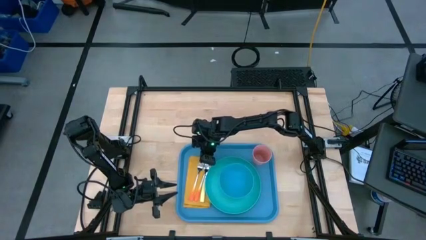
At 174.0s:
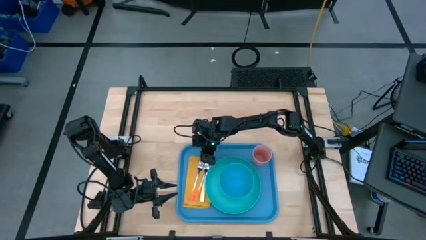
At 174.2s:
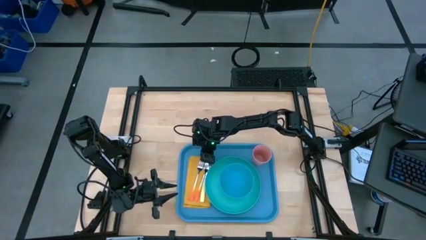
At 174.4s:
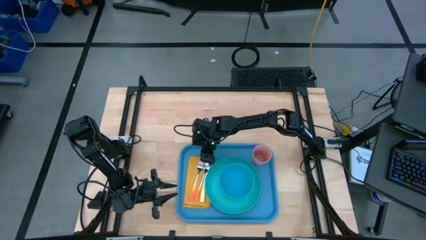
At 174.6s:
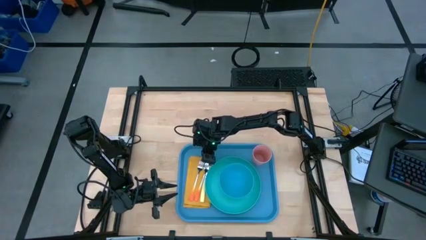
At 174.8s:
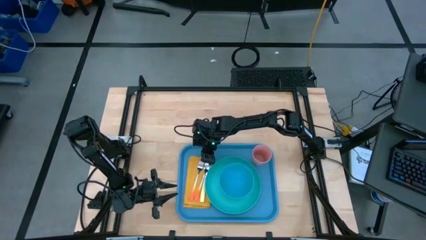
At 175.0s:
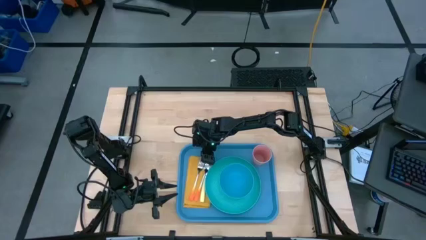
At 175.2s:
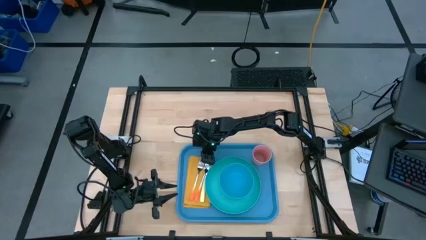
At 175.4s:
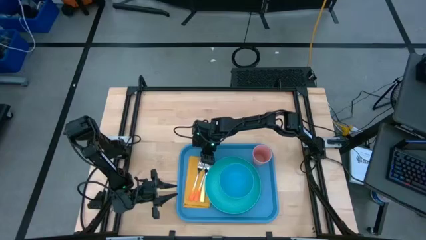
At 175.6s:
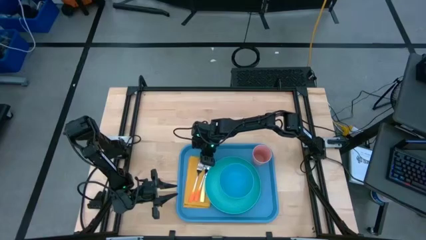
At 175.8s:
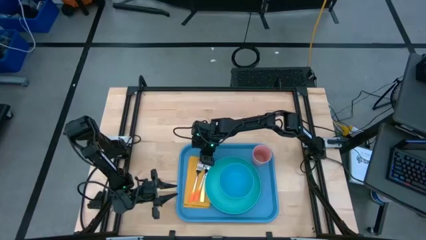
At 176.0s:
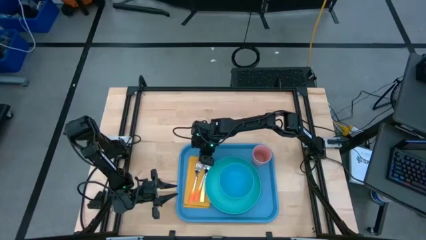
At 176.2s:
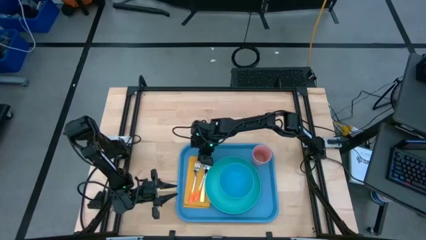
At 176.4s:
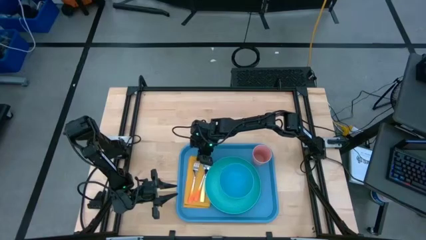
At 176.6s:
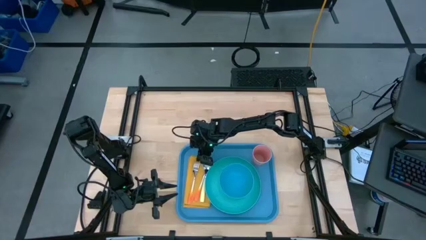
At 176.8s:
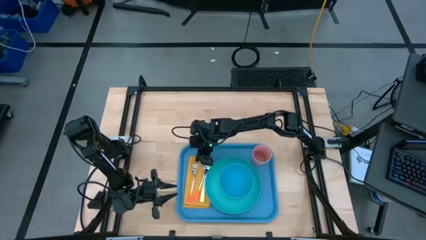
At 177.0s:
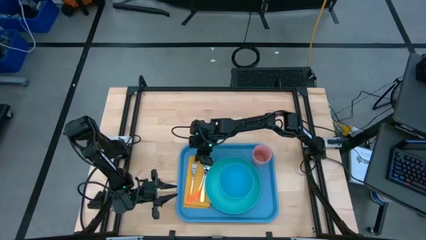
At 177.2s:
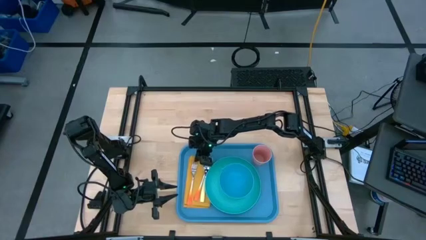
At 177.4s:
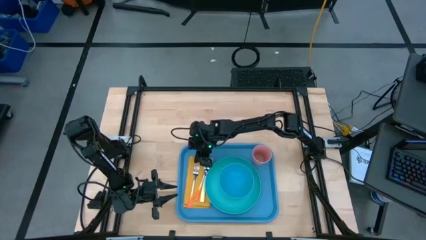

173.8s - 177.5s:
Task: Set up tray
Put the orange fork on top of the yellow napkin to the left of the orange spoon

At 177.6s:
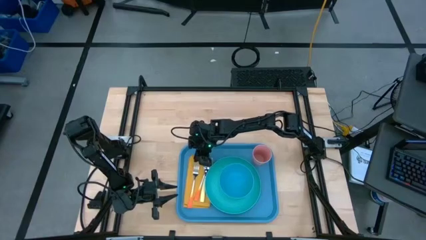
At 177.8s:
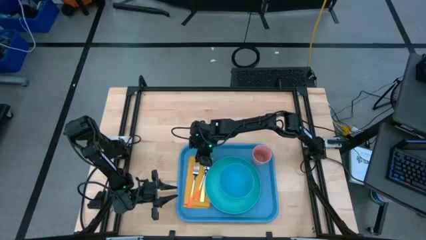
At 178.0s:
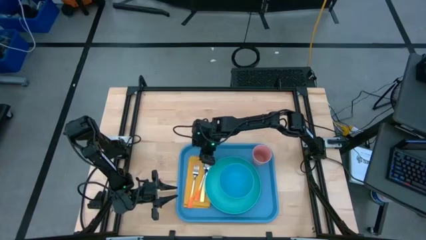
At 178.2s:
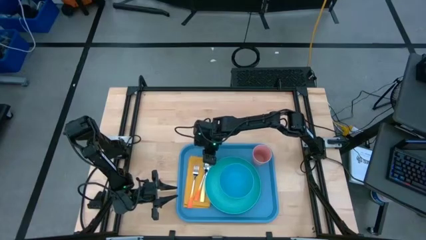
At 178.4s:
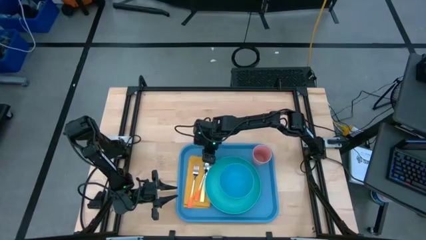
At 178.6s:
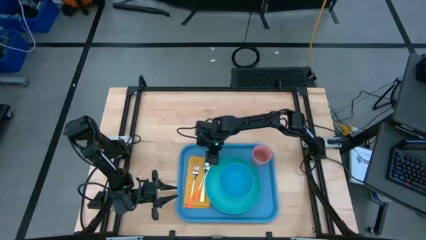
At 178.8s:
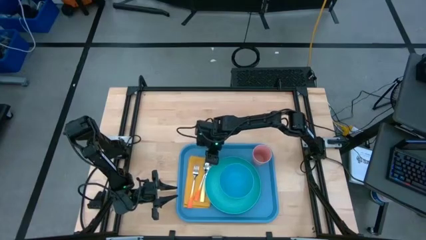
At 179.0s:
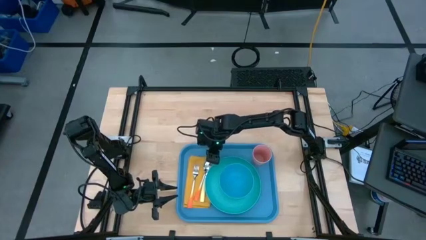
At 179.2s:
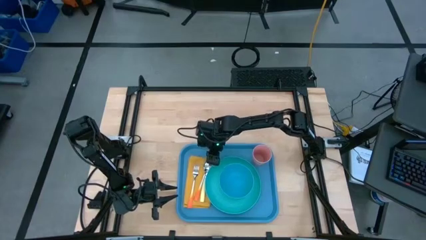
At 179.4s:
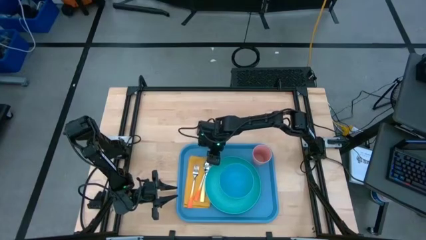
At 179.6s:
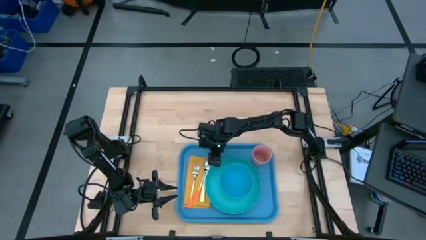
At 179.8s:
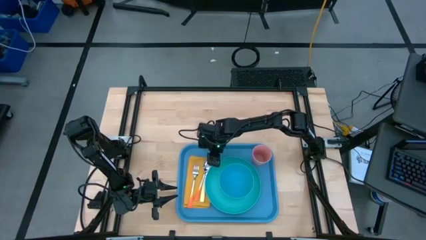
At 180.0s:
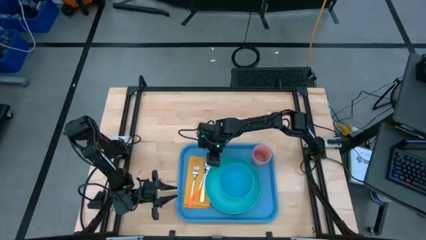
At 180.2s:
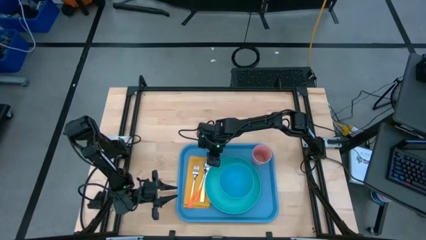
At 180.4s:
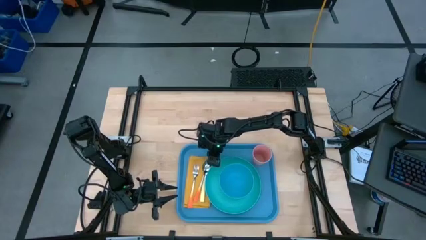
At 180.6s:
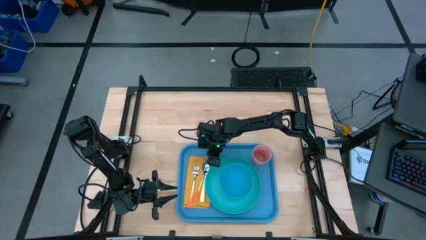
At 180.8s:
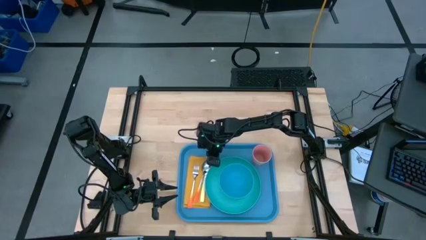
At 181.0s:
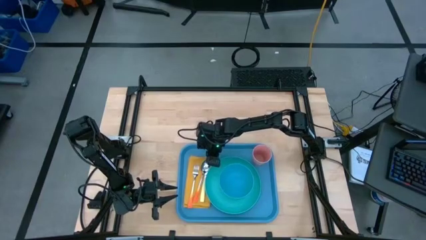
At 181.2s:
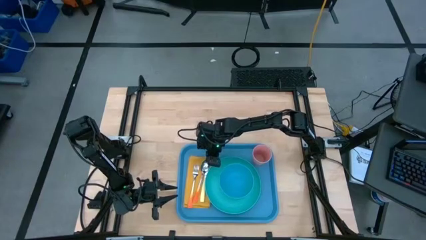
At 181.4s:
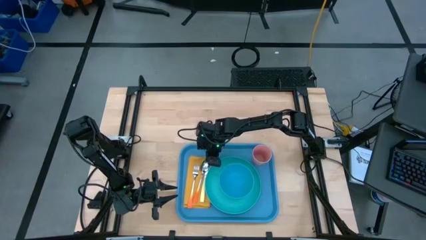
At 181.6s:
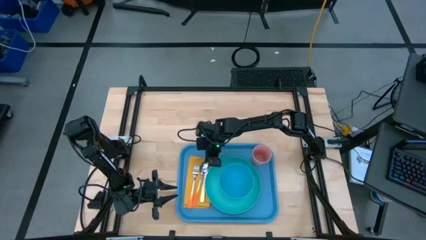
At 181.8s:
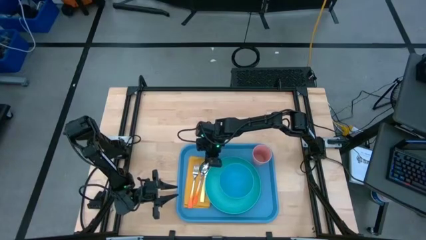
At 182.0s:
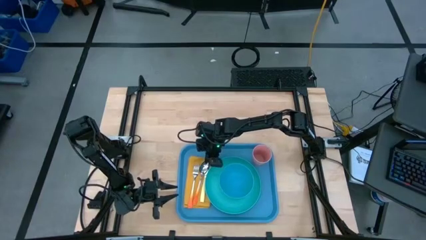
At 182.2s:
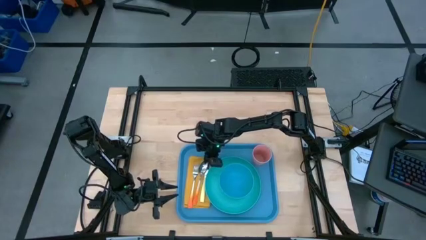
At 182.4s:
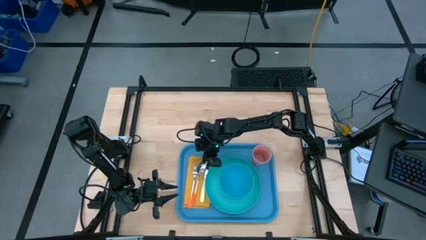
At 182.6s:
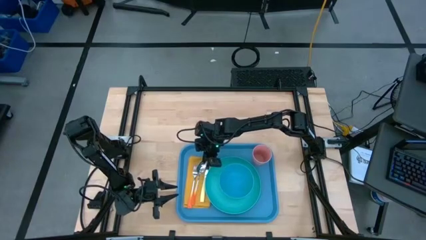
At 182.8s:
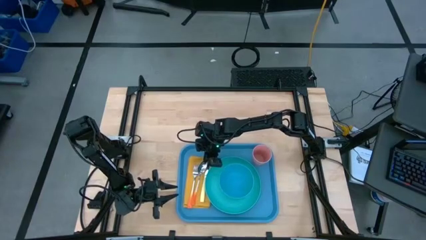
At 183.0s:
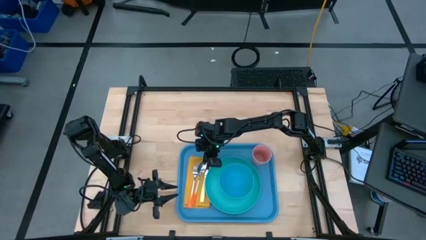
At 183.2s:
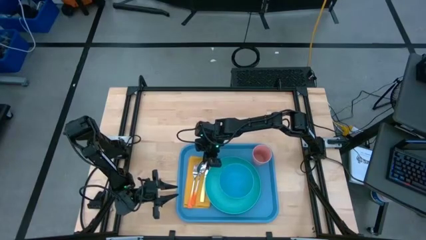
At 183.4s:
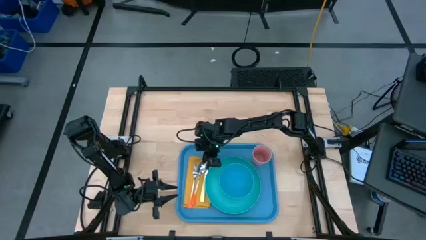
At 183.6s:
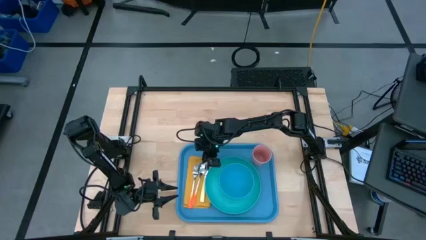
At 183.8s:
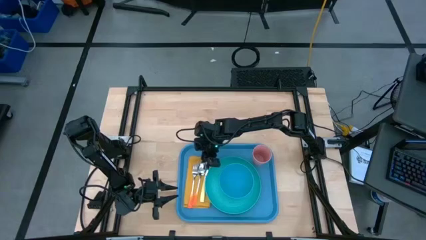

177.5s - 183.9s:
Adjust the orange spoon

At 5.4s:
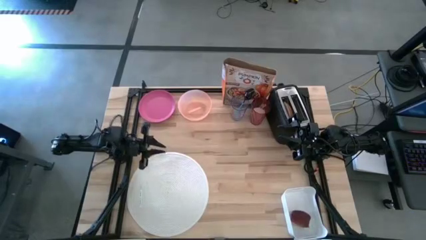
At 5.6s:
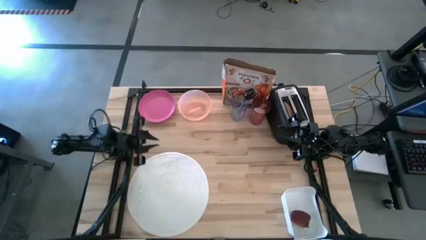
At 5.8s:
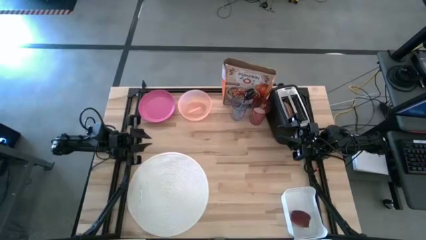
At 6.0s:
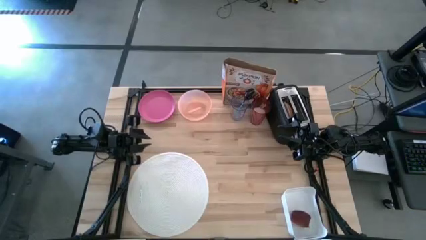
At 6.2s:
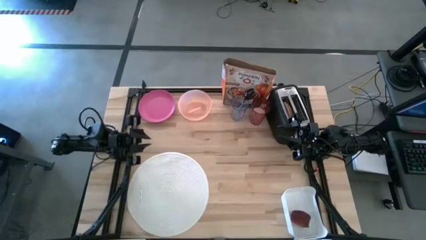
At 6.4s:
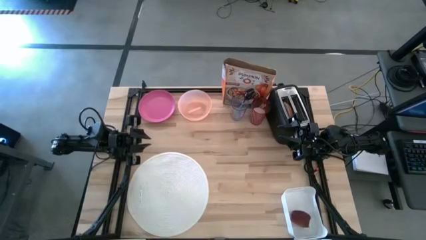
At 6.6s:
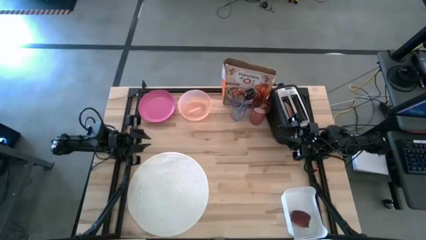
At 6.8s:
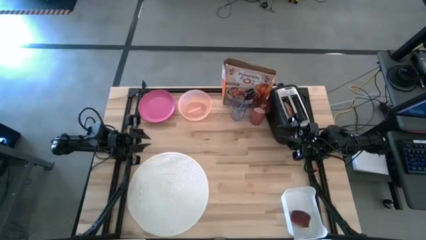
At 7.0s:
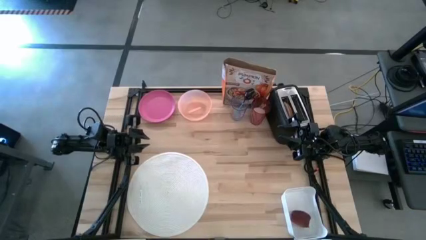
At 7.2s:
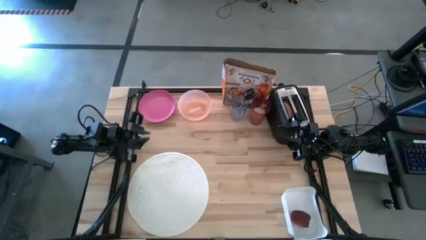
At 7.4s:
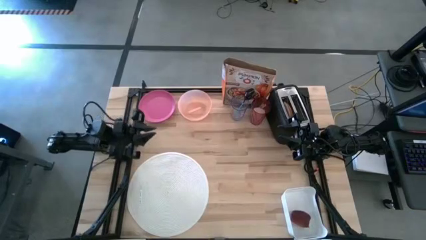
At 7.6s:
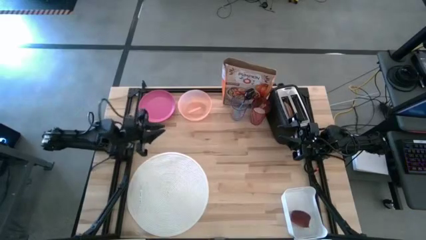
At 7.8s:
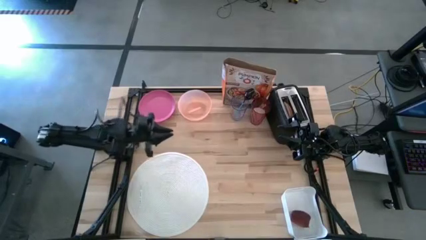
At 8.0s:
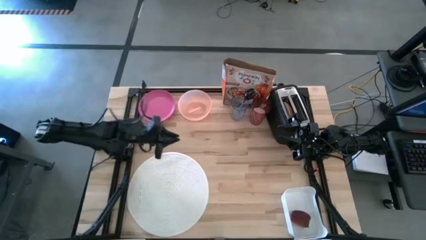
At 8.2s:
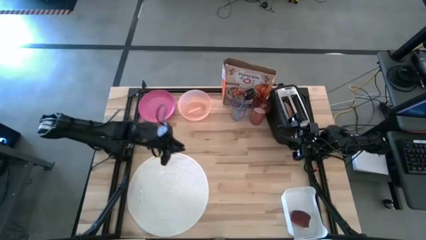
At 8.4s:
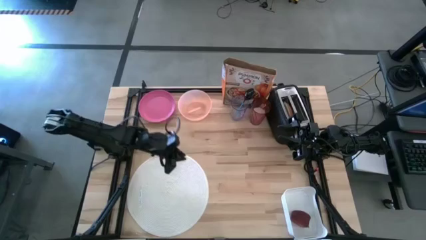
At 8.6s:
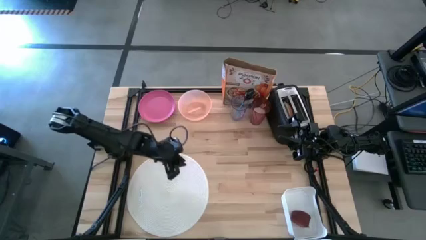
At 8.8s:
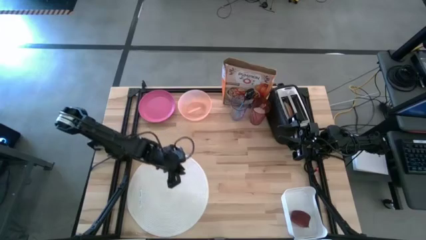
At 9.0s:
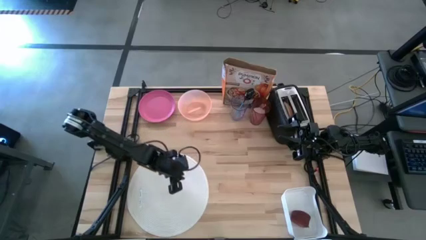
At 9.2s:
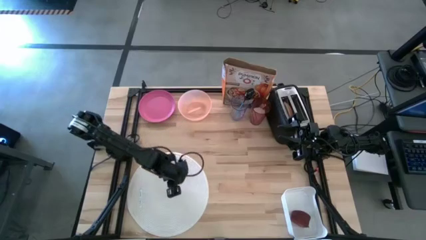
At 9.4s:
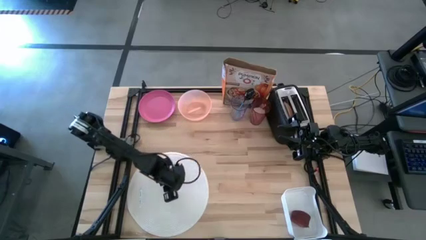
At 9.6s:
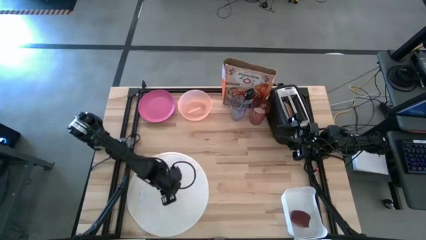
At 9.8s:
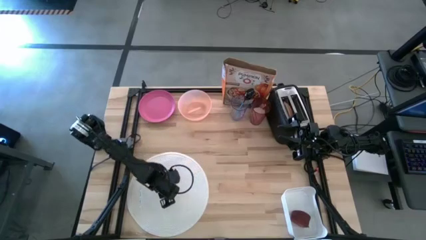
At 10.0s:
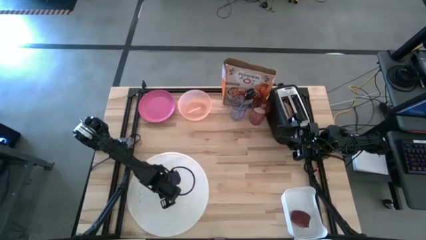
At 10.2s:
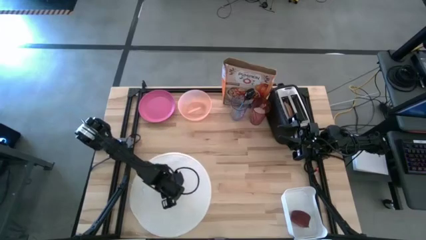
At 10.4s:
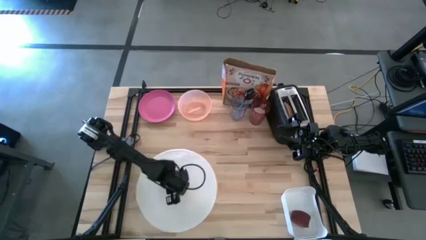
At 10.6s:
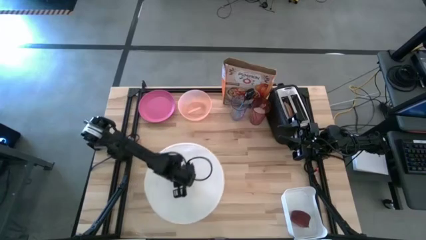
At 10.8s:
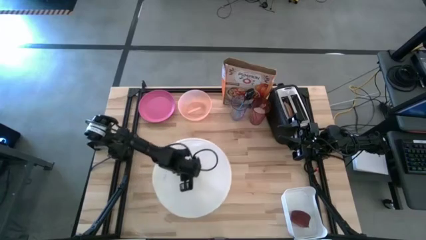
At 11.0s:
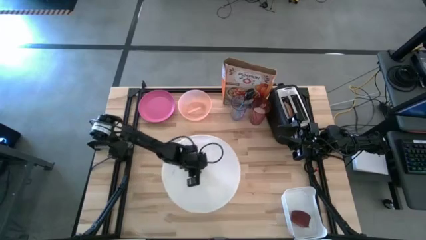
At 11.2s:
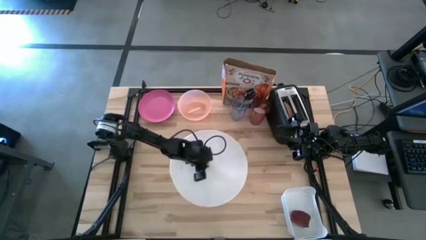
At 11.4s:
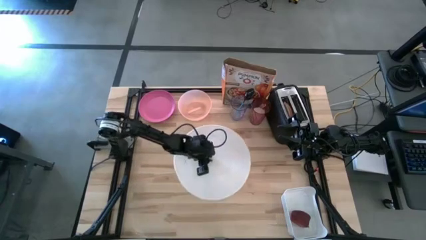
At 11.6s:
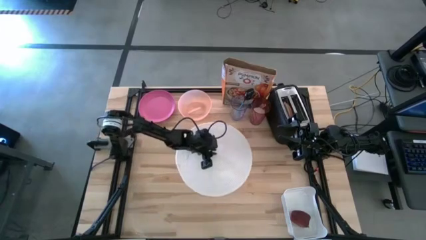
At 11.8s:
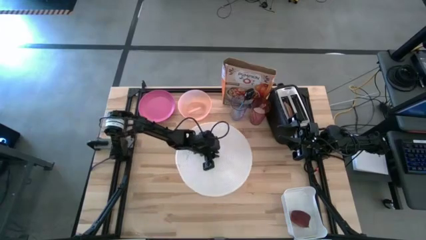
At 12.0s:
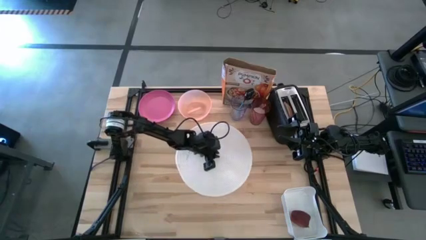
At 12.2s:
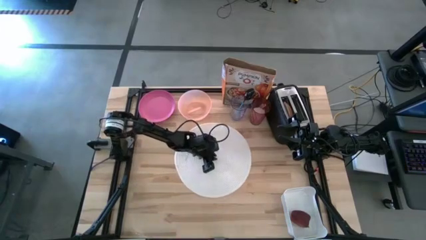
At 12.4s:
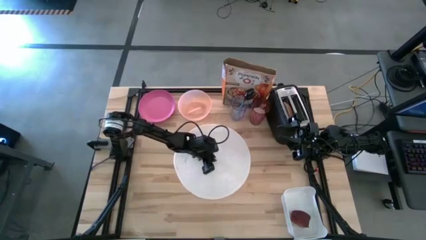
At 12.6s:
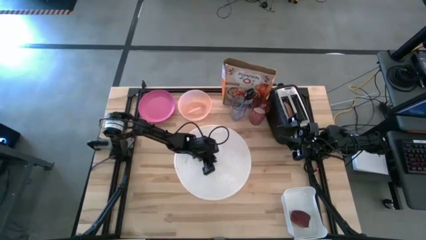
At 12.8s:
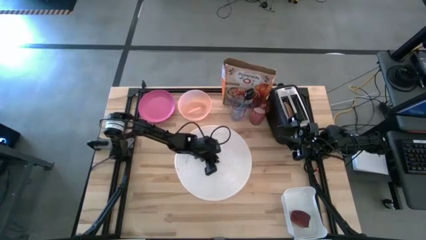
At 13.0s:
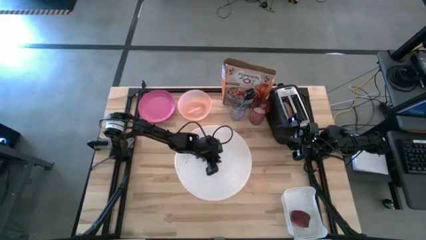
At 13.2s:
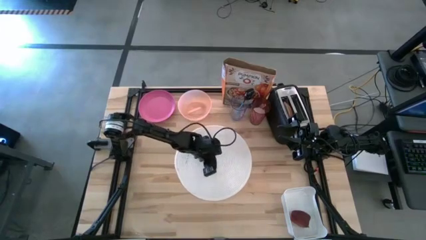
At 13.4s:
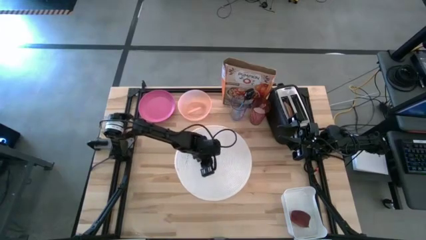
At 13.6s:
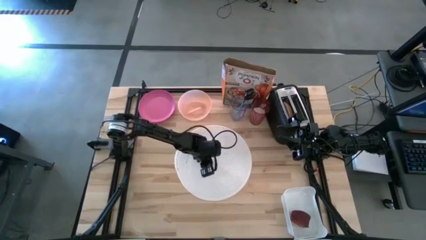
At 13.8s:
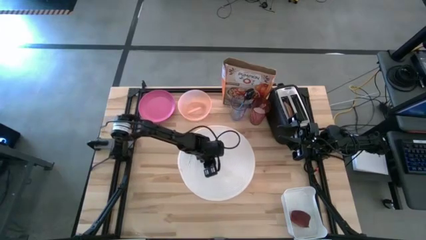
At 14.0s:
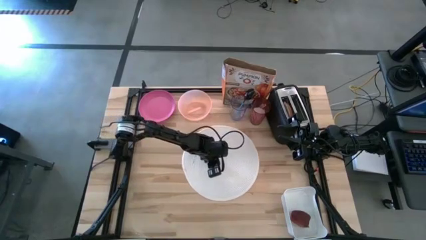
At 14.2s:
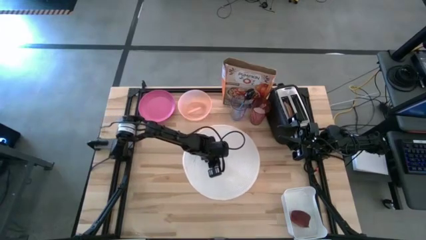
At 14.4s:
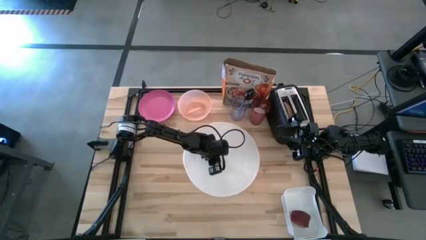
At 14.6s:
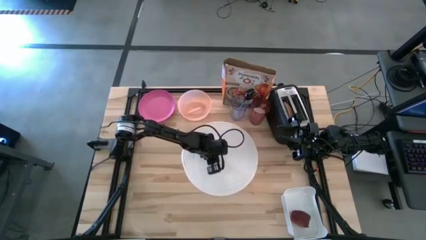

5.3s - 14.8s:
Task: Arrange a breakfast setting
Move the white table mat to the center of the table
